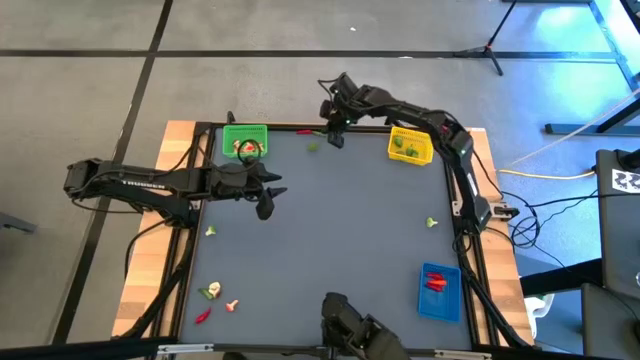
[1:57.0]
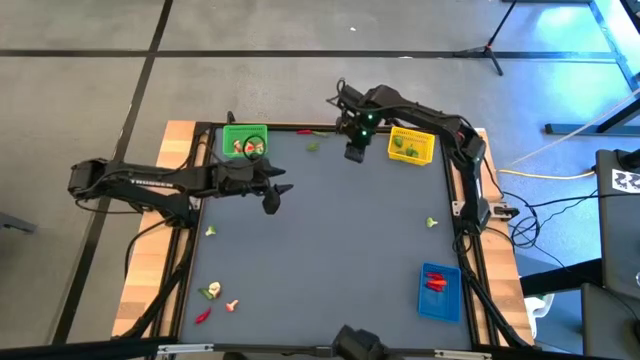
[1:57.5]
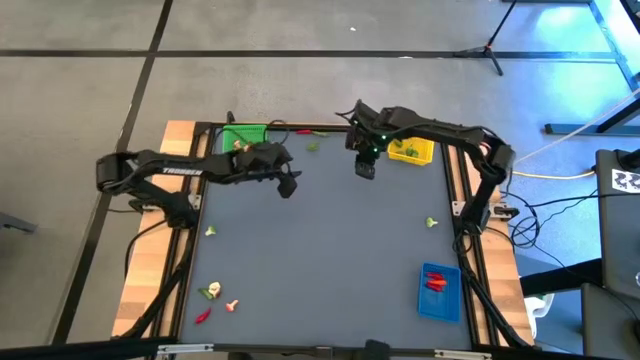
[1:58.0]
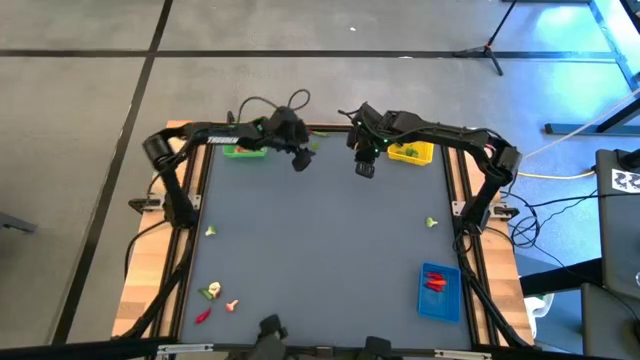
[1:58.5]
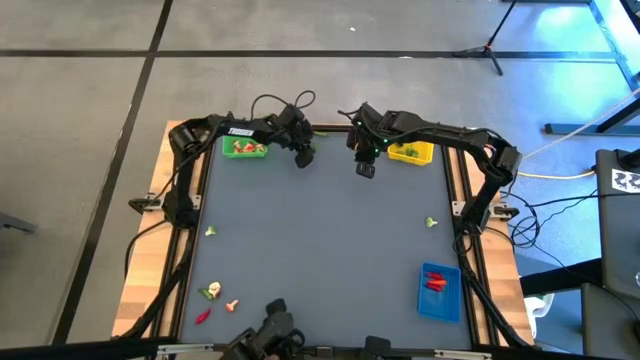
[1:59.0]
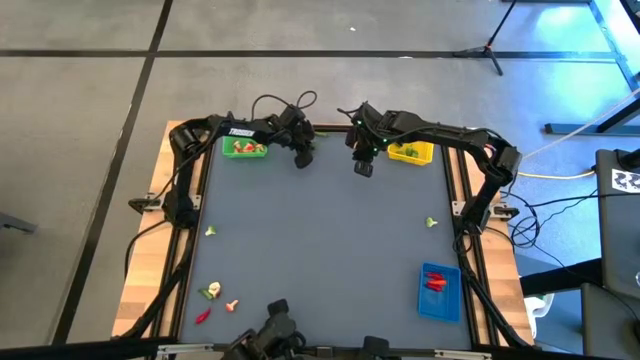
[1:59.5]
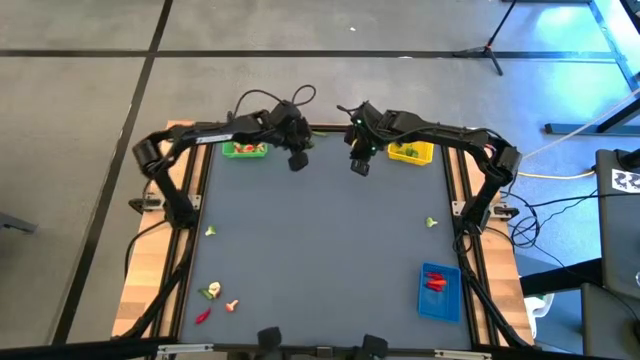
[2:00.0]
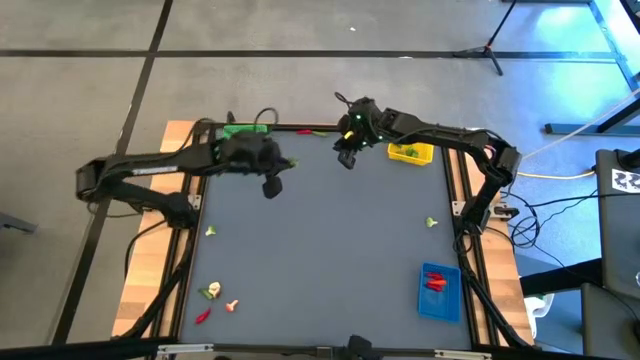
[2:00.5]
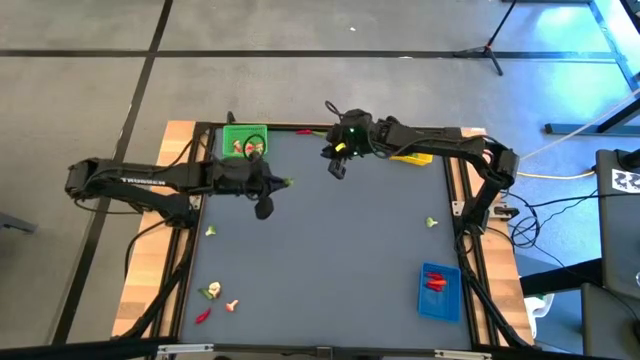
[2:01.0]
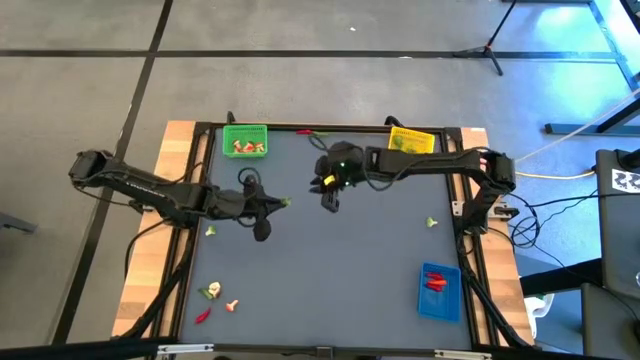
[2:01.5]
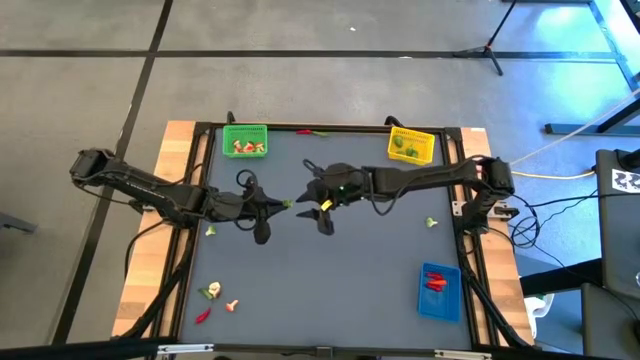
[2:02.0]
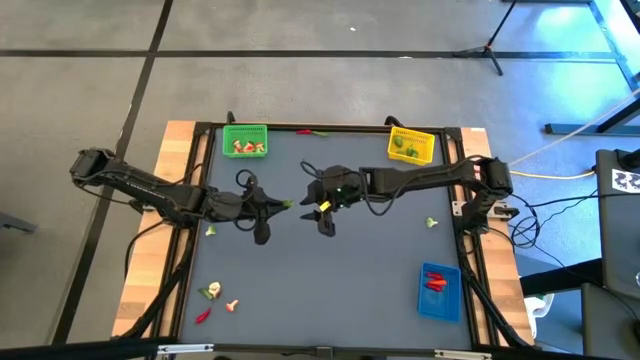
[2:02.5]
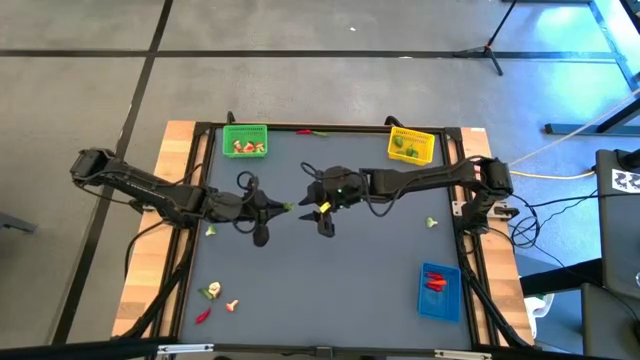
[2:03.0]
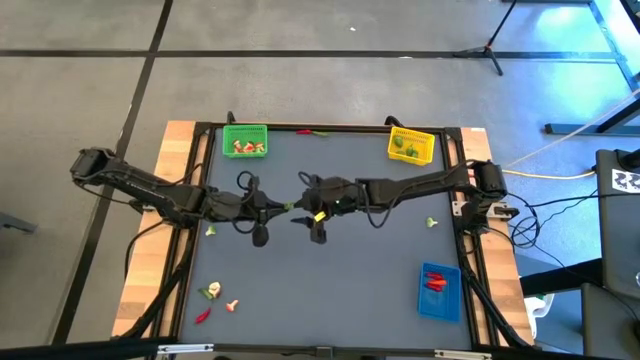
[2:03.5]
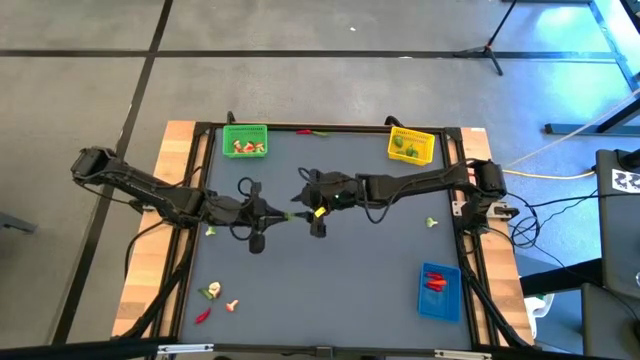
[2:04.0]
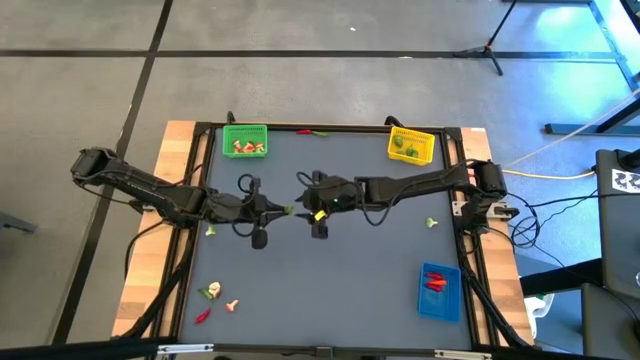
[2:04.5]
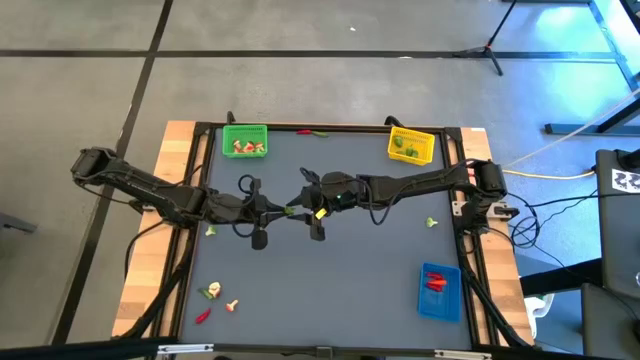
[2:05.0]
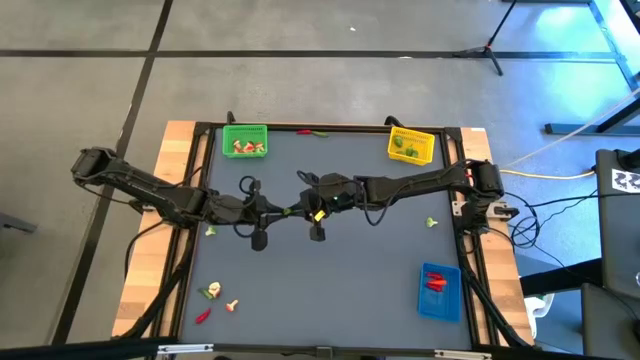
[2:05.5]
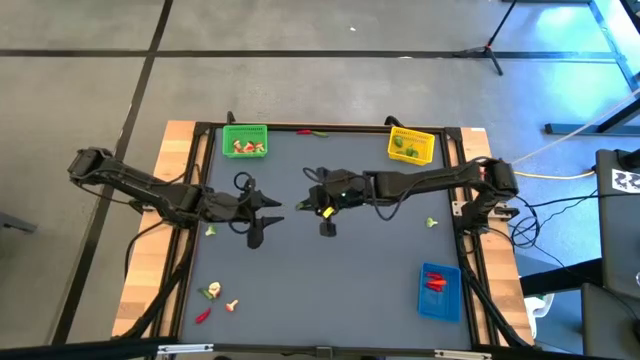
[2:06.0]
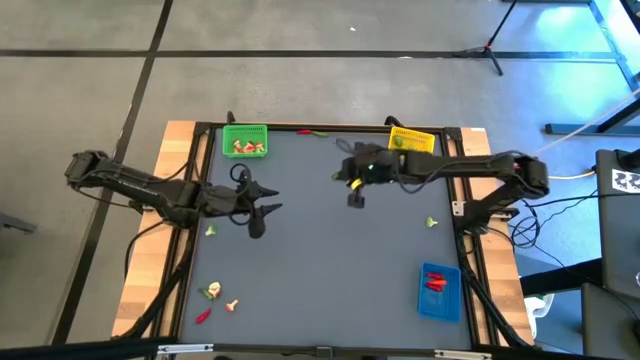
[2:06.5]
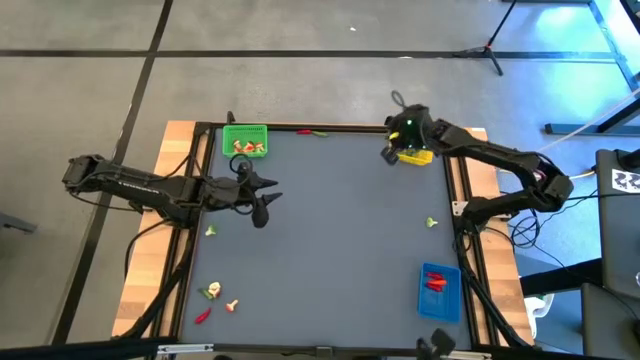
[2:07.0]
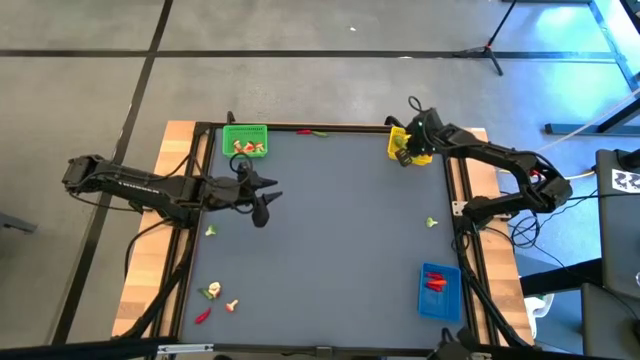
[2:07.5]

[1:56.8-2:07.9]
Task: Sort produce into baskets
Put the green chili pepper into the yellow bin

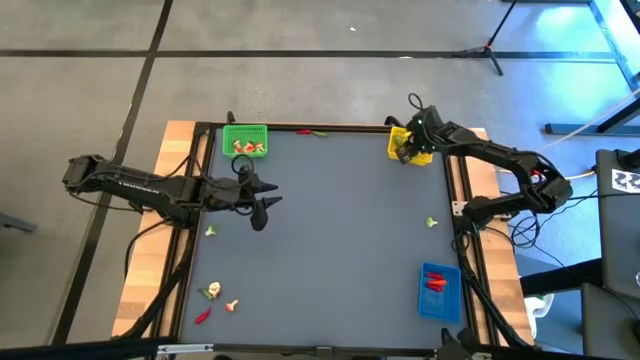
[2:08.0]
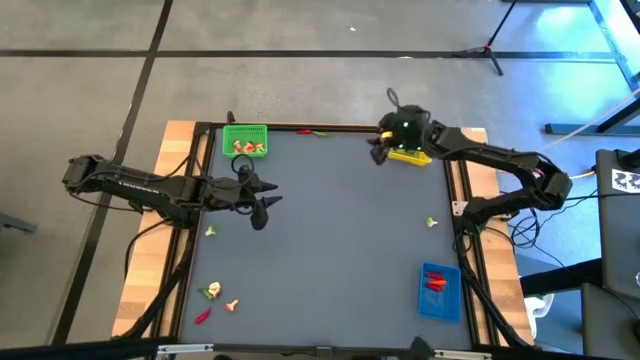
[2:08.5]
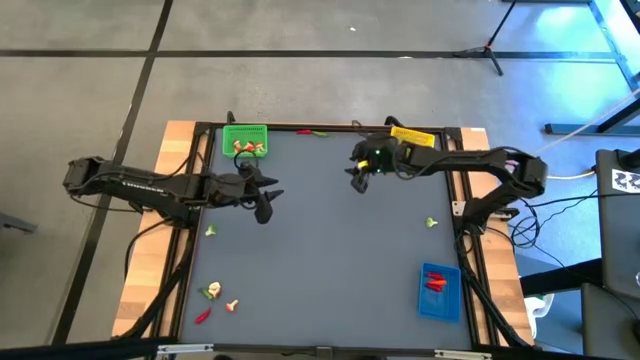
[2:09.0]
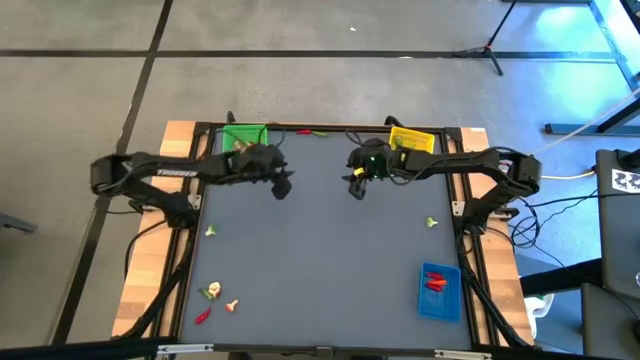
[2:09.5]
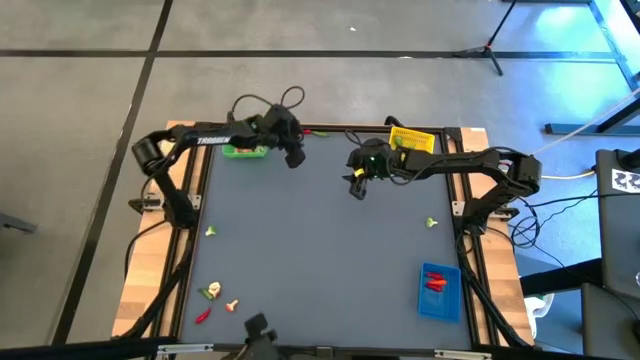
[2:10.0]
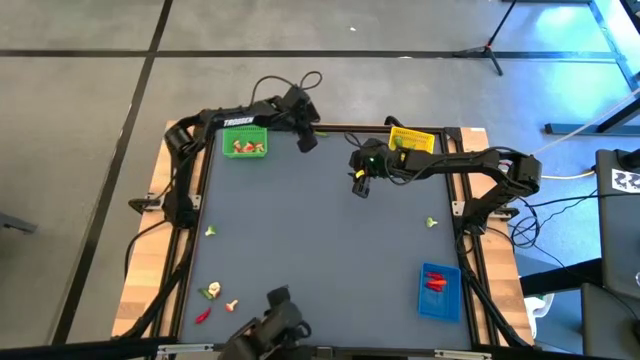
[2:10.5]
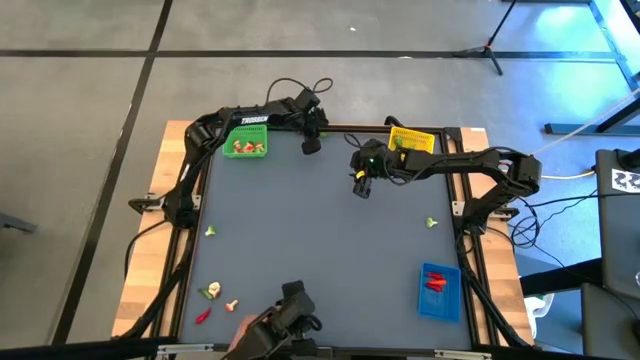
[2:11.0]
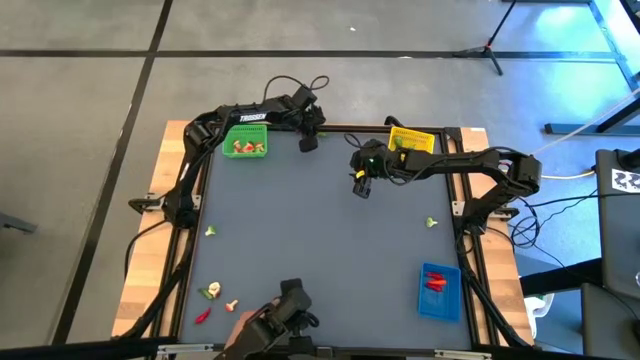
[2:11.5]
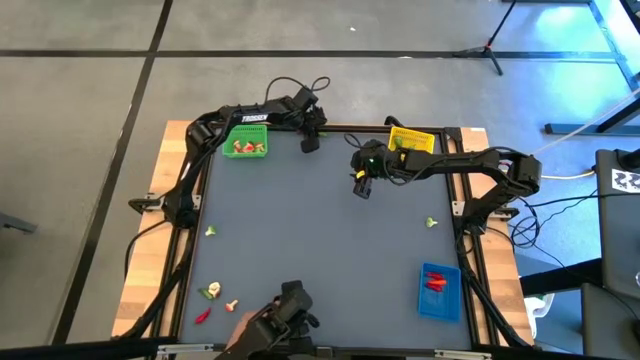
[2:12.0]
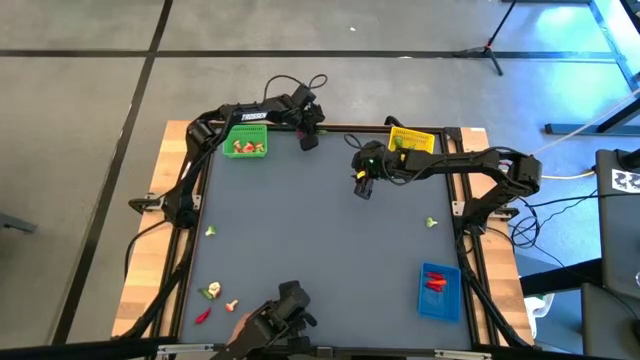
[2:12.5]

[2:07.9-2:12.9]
Put the green chili pepper into the blue bin

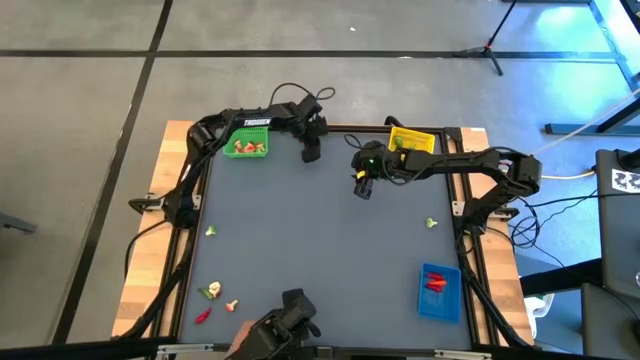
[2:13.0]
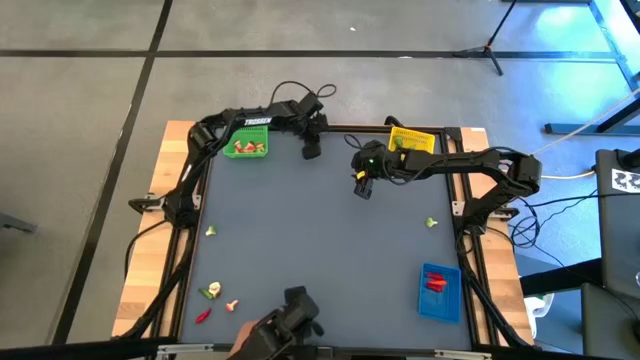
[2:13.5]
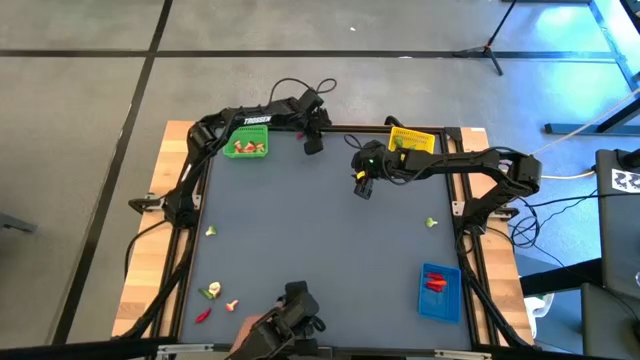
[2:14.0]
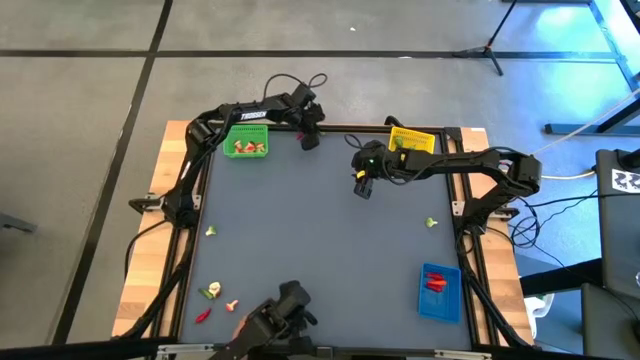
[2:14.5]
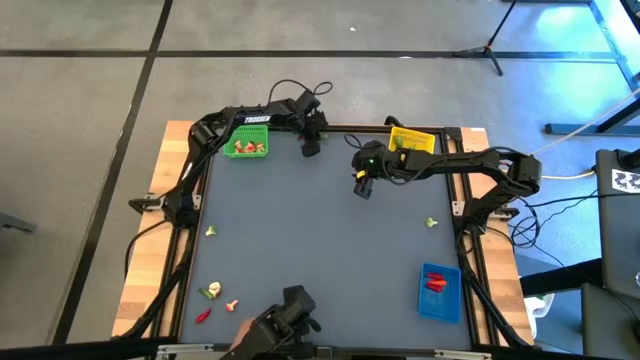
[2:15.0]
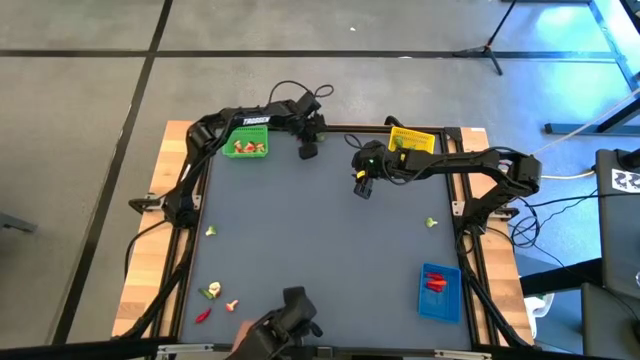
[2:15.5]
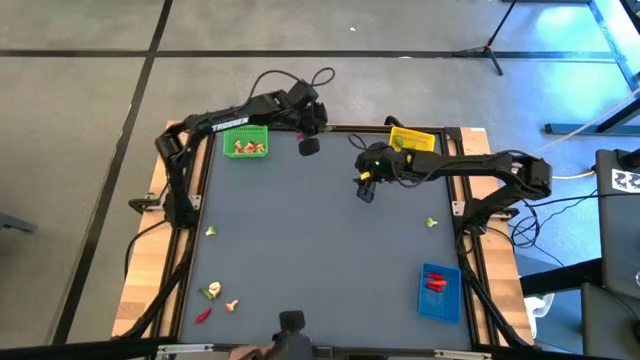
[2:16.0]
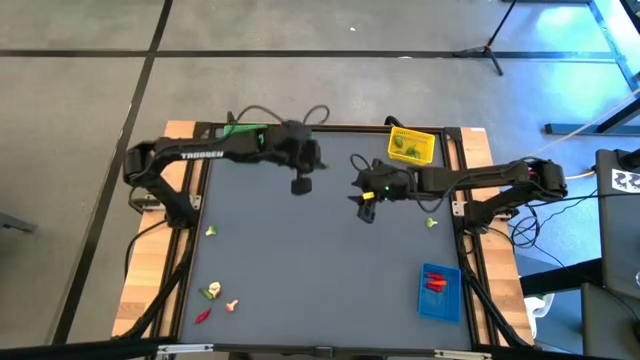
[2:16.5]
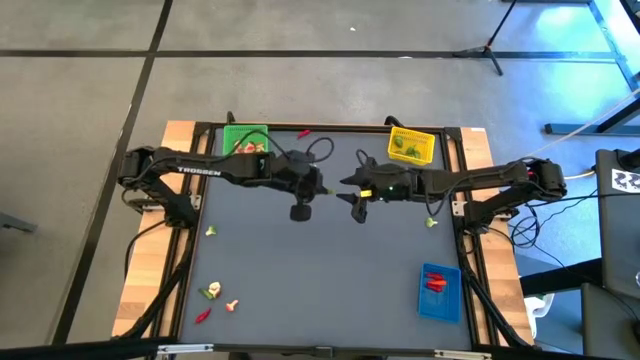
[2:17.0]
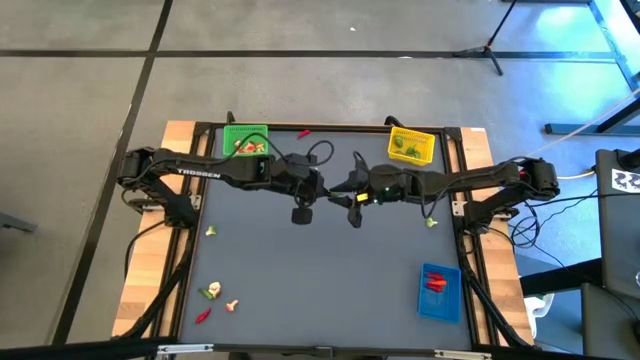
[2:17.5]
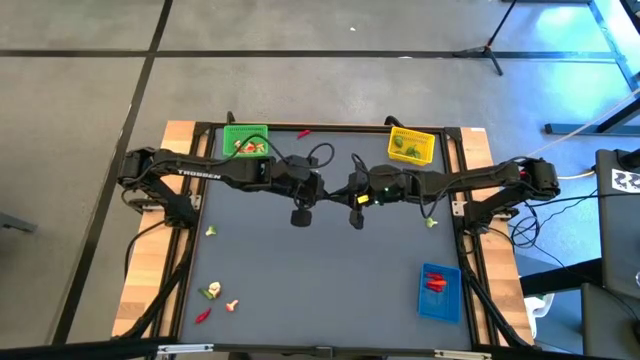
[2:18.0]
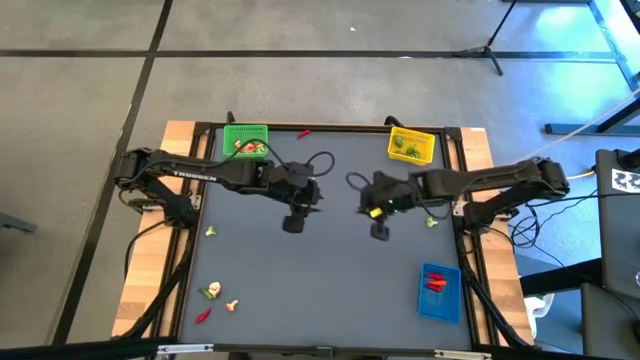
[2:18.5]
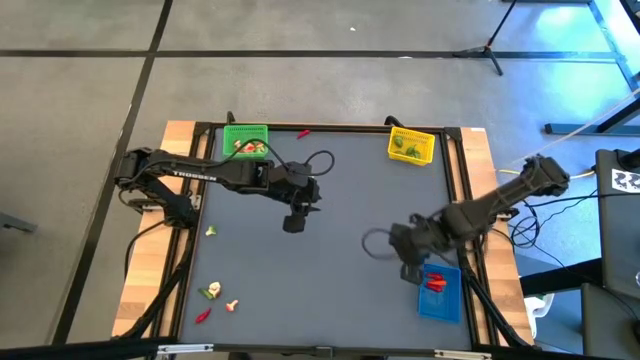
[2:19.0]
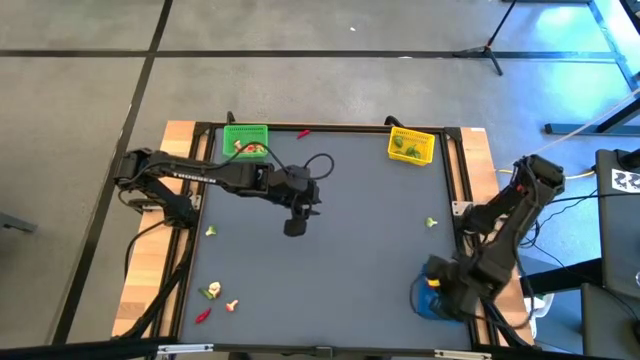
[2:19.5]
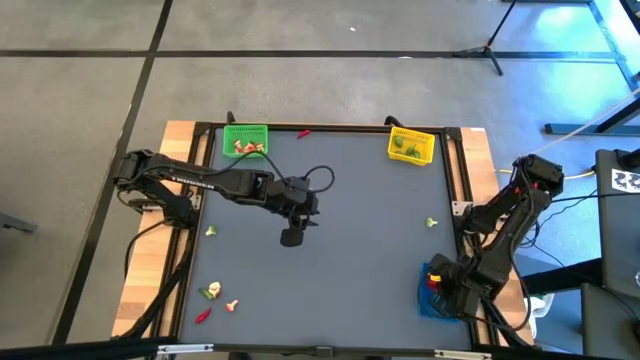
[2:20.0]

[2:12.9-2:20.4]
Put the green chili pepper into the blue bin
